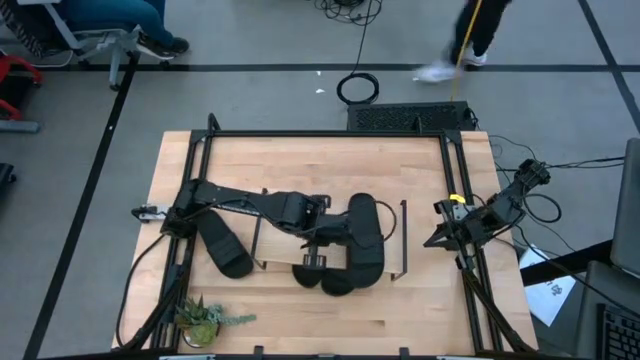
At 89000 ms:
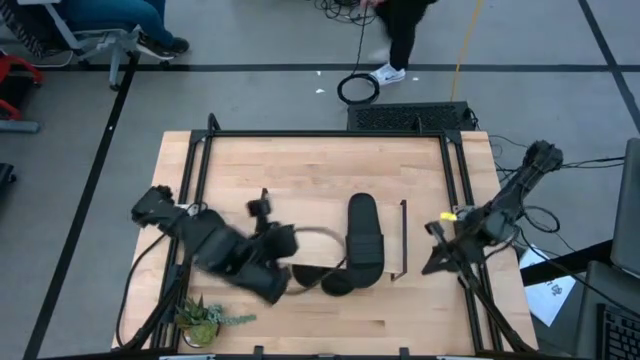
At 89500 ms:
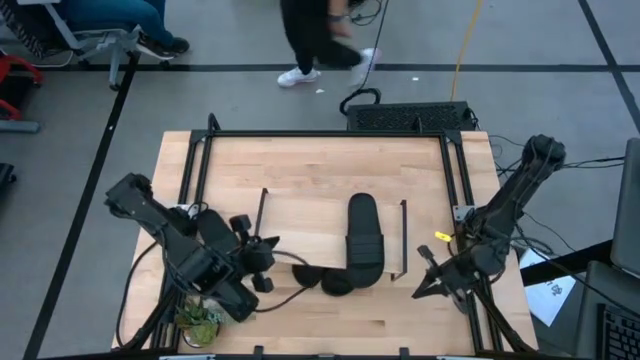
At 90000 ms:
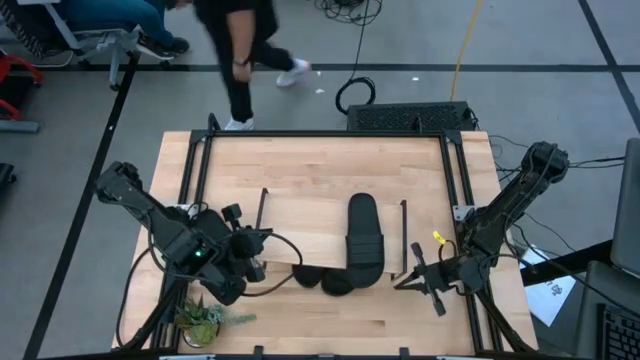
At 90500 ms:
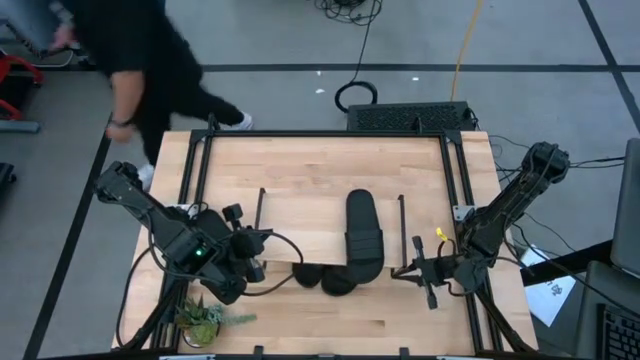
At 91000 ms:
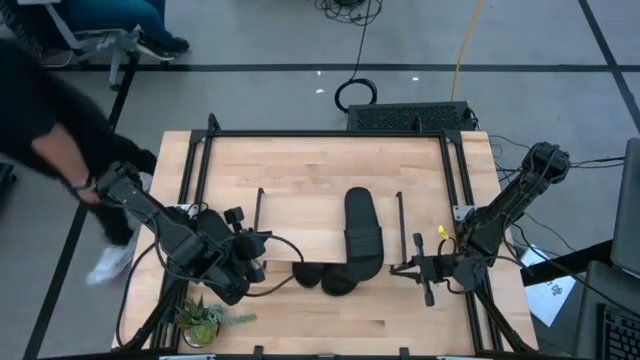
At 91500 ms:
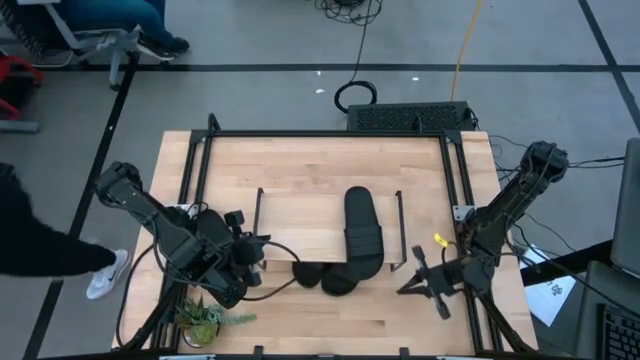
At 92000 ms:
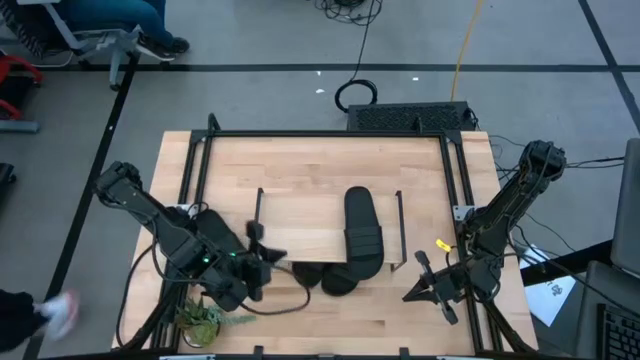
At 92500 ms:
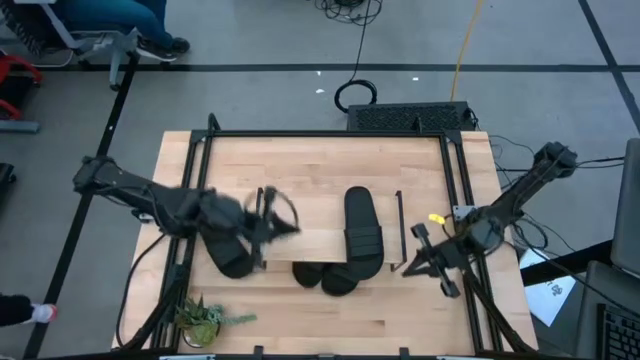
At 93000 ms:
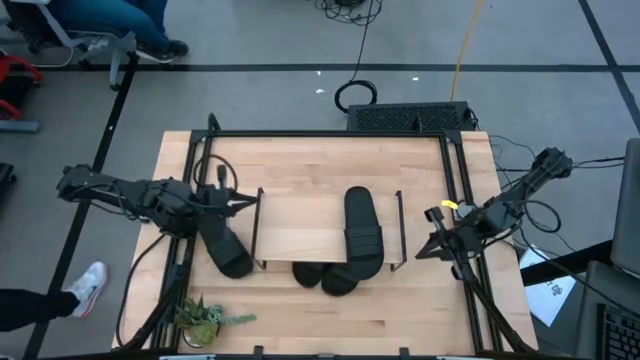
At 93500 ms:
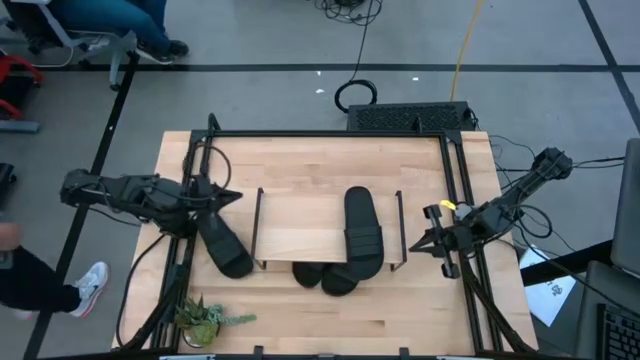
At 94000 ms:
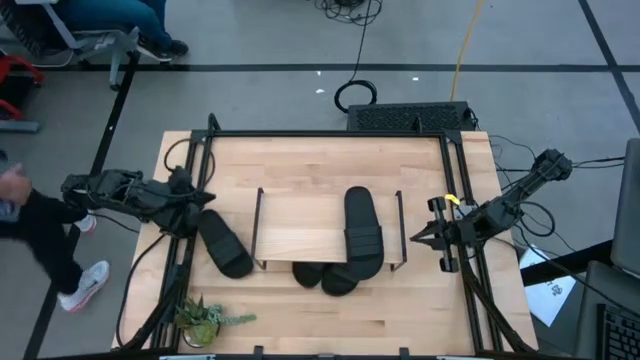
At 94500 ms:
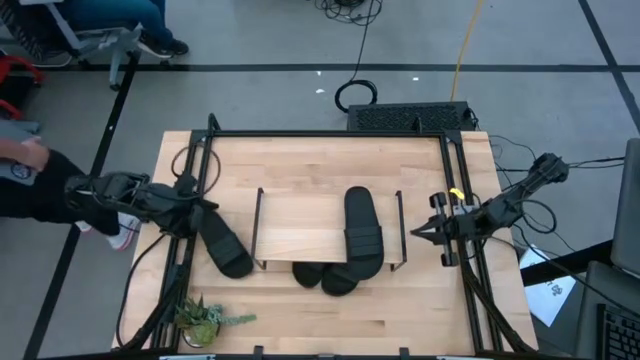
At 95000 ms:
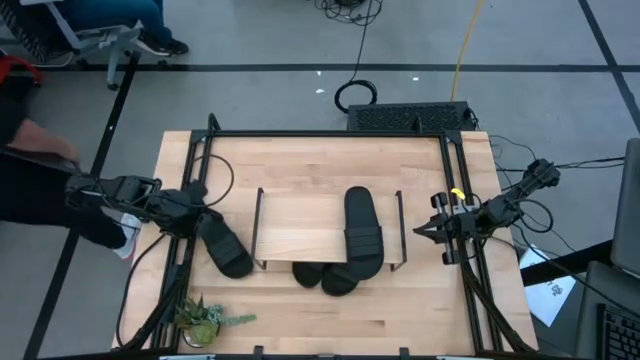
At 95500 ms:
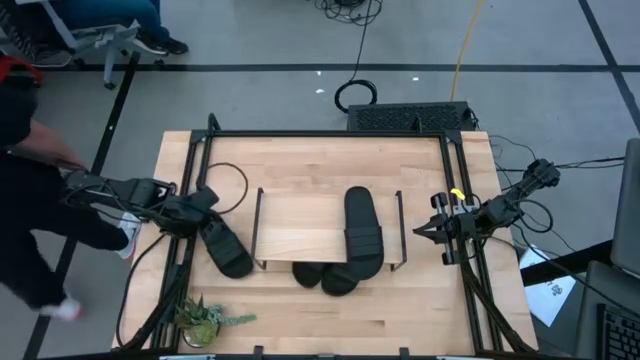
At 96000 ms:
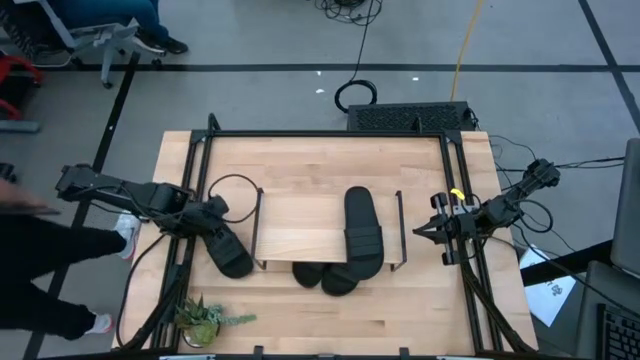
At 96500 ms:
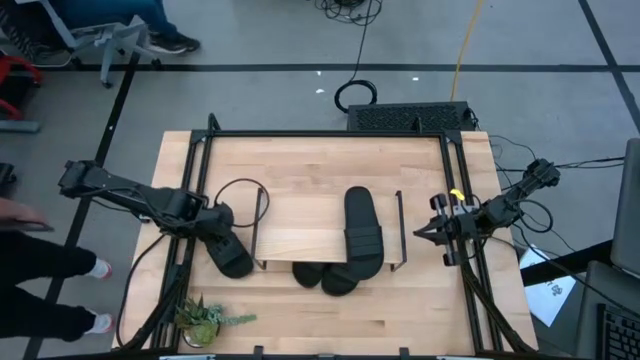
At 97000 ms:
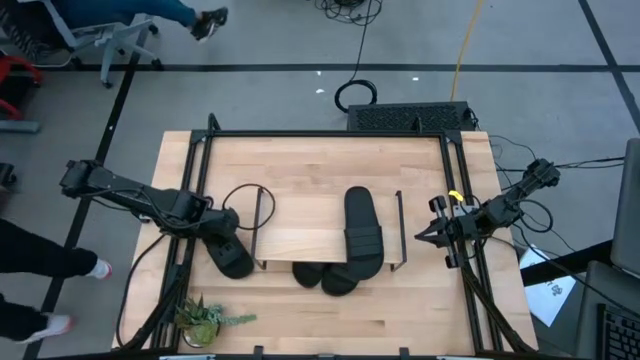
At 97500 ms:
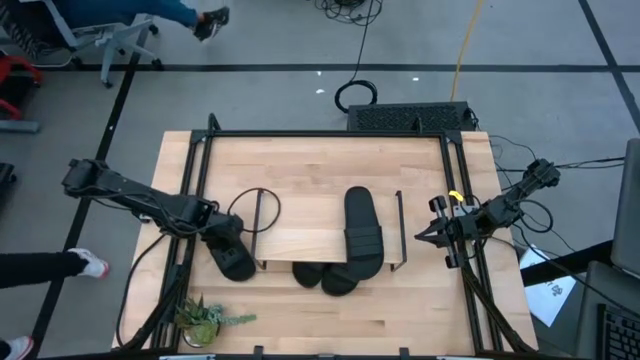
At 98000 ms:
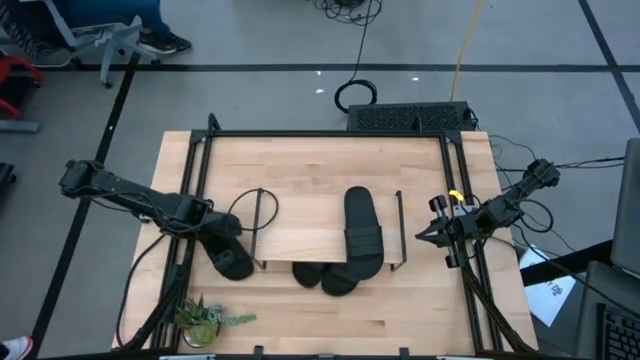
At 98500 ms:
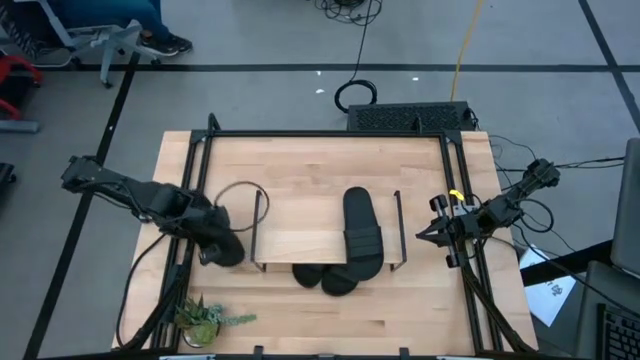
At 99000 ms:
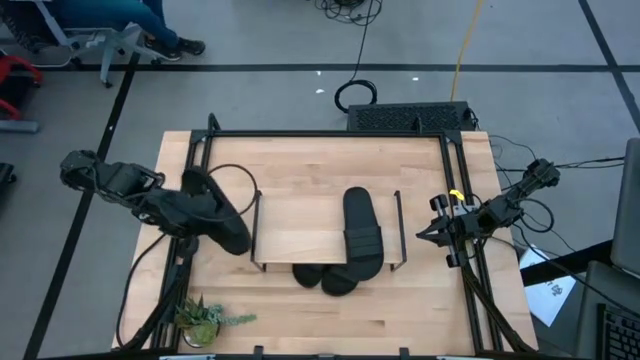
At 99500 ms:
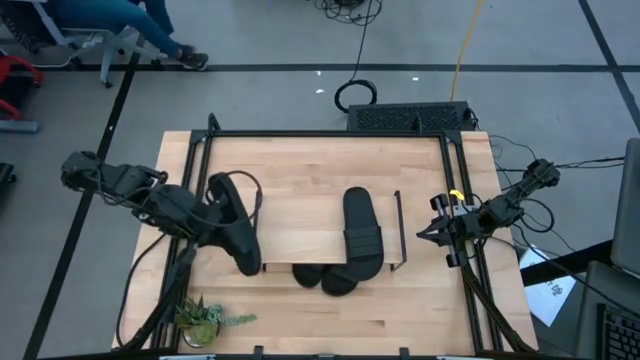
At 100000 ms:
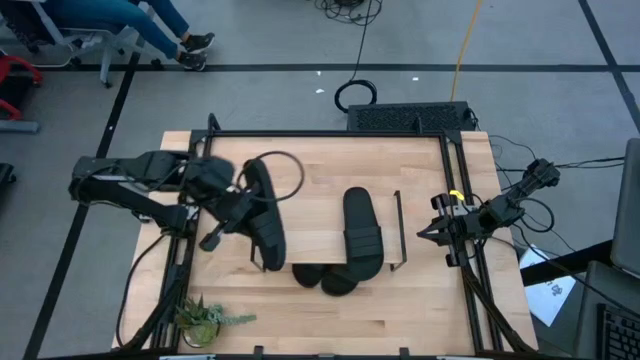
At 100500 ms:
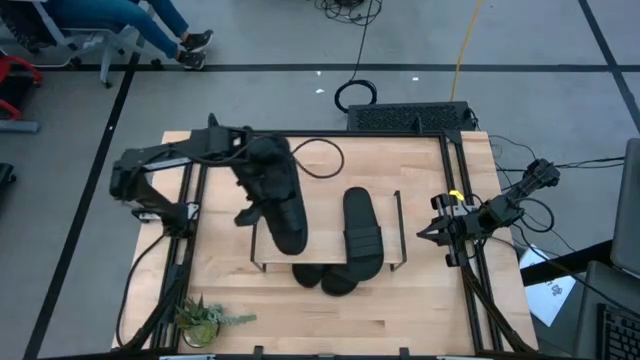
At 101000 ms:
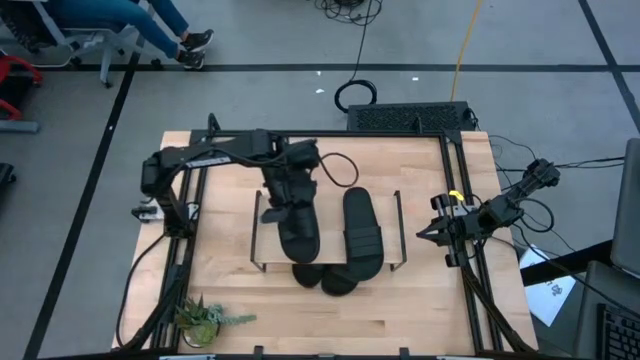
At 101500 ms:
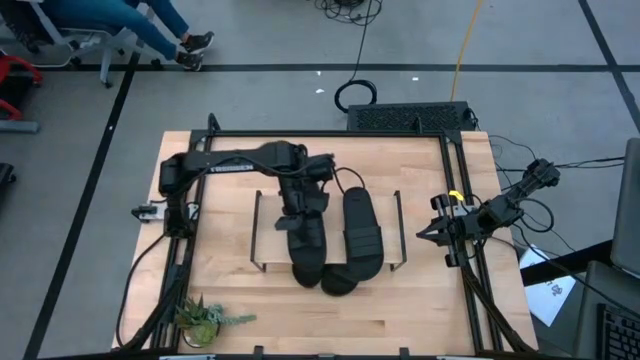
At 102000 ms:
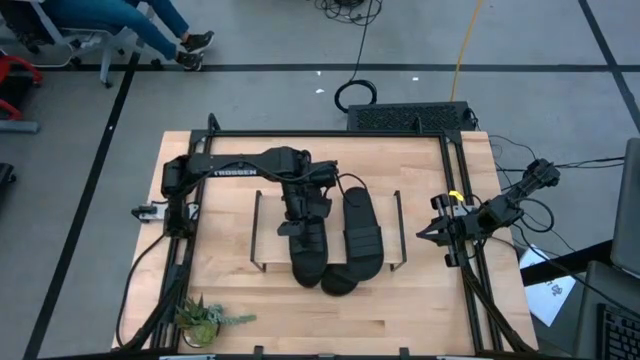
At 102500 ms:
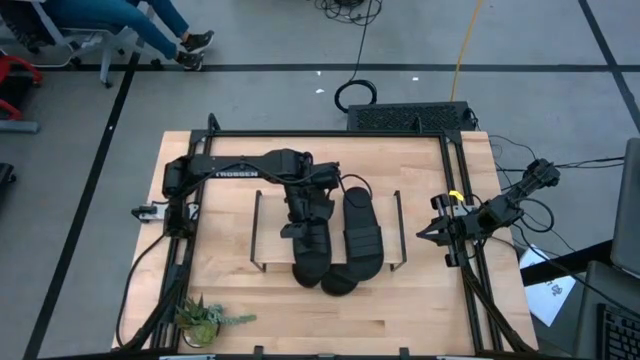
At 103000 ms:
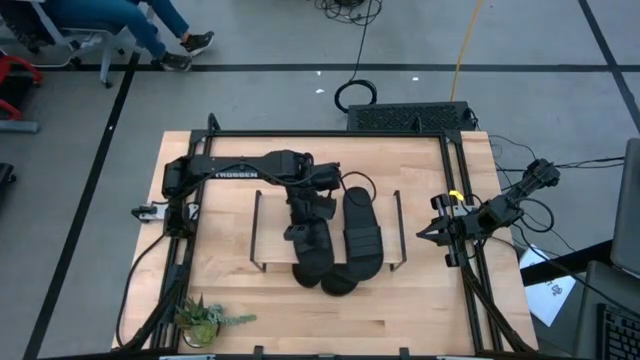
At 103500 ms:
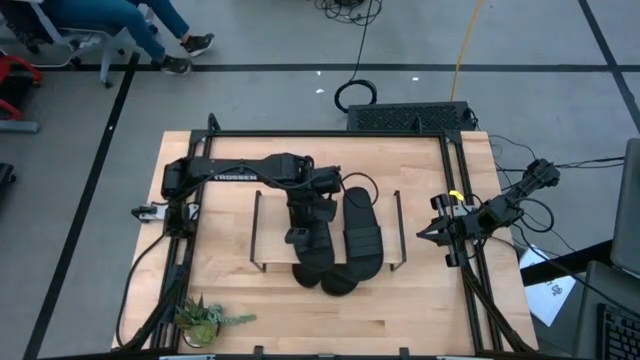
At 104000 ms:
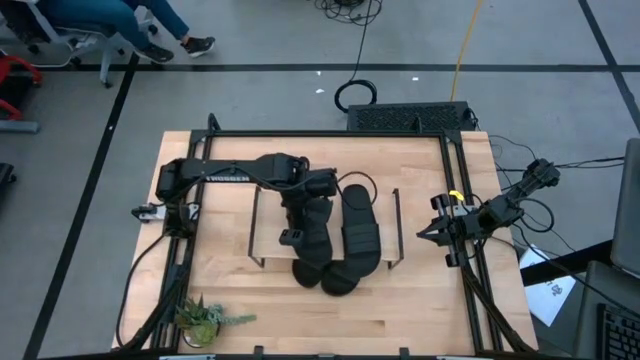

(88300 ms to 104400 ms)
Task: Pick and place slides into the shelf
Put the left black slipper aligned with the right black slipper on the shelf

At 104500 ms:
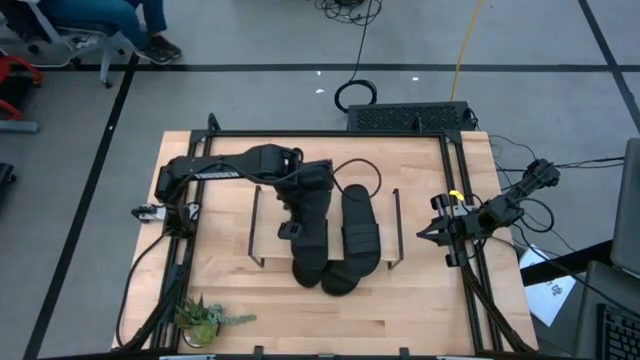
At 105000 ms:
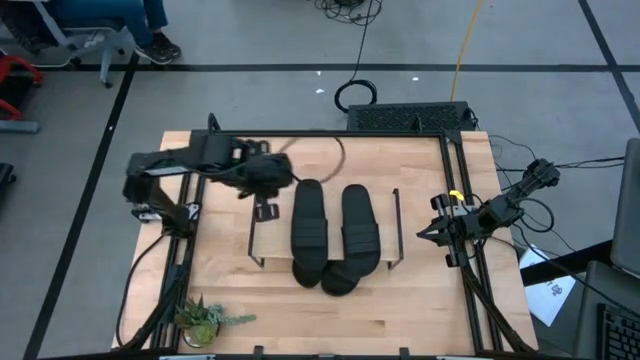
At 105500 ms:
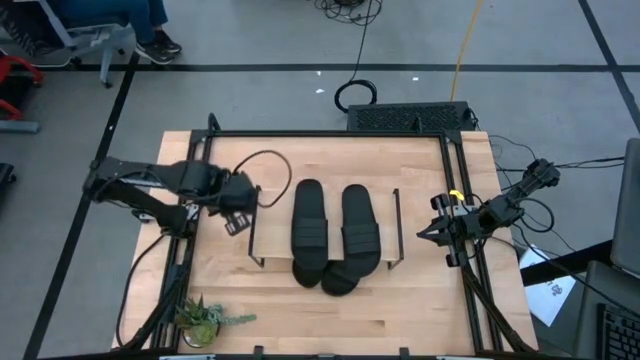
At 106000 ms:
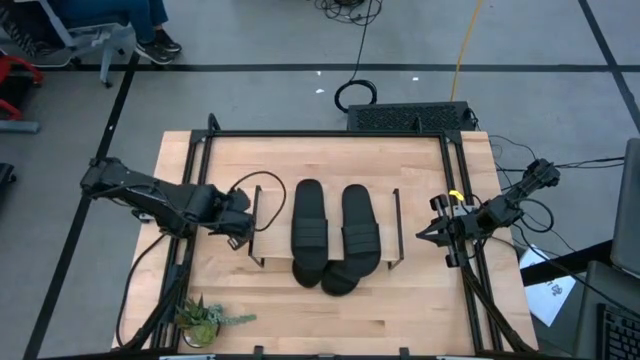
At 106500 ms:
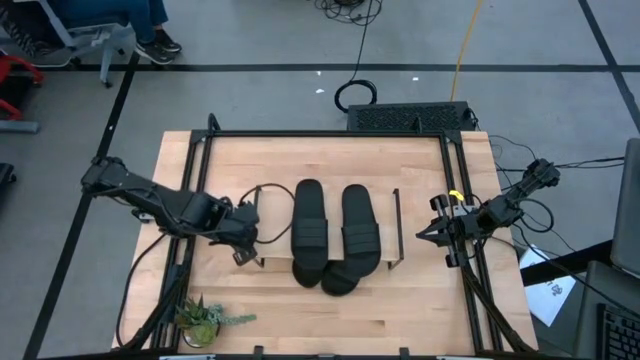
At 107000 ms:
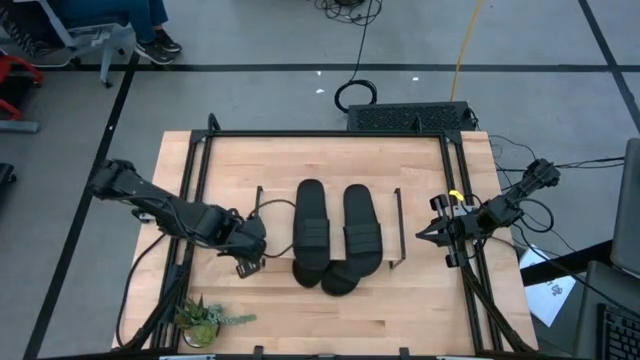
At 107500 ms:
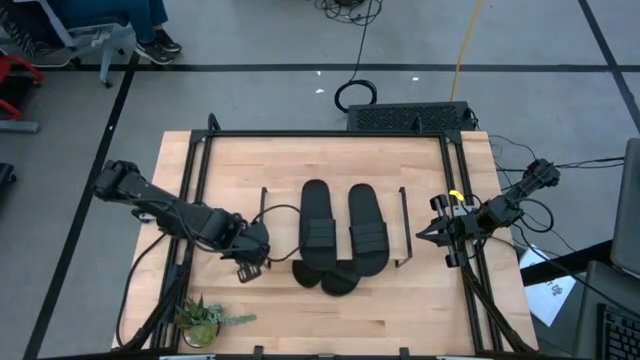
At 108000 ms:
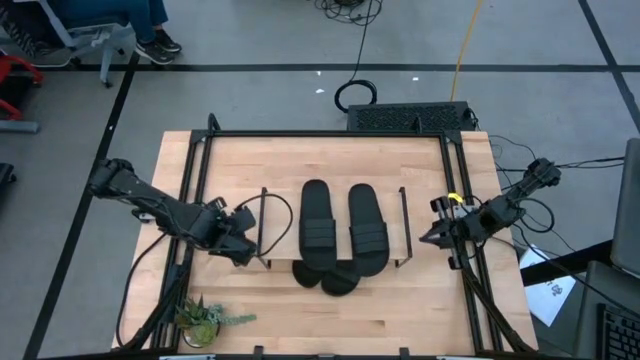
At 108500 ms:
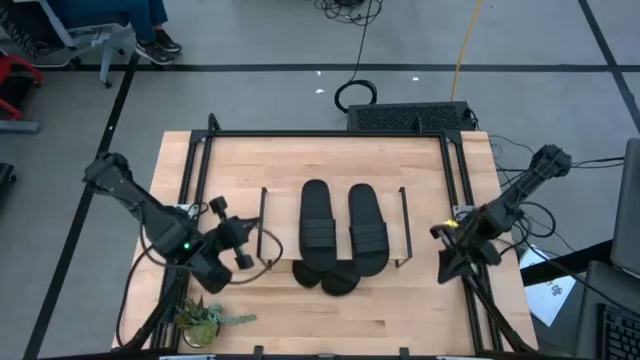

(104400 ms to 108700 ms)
Adjust the shelf

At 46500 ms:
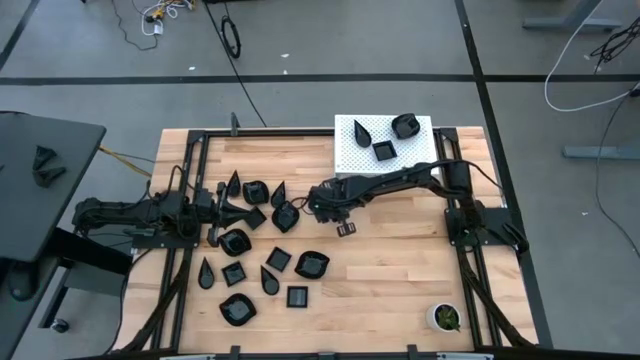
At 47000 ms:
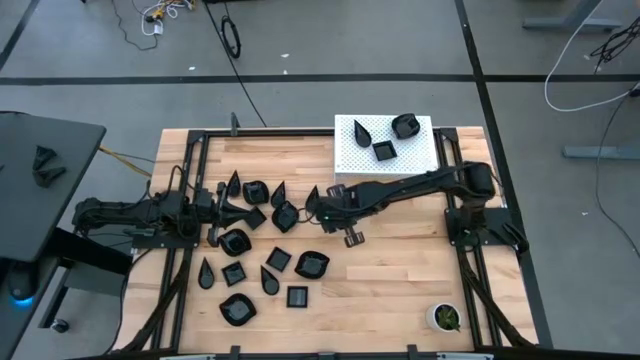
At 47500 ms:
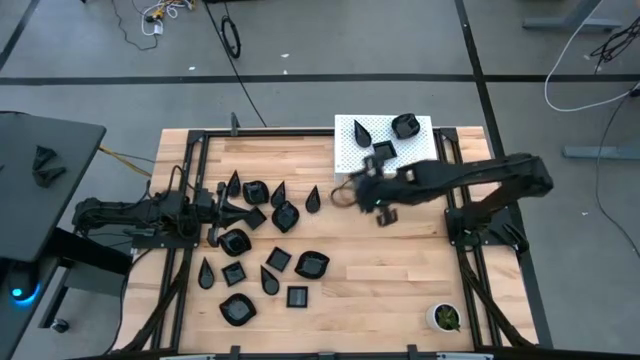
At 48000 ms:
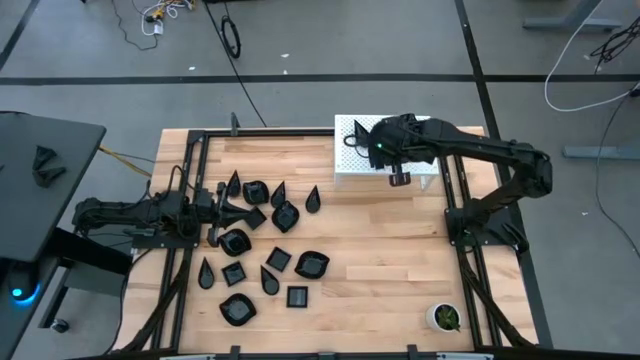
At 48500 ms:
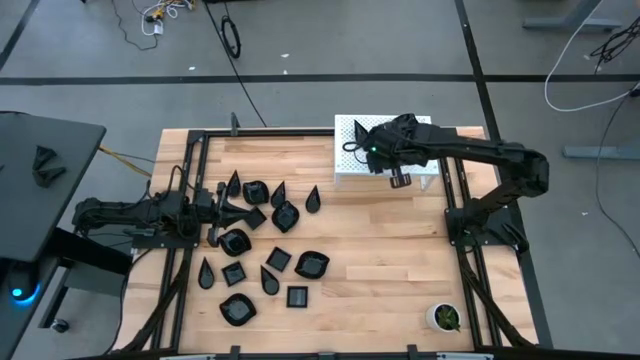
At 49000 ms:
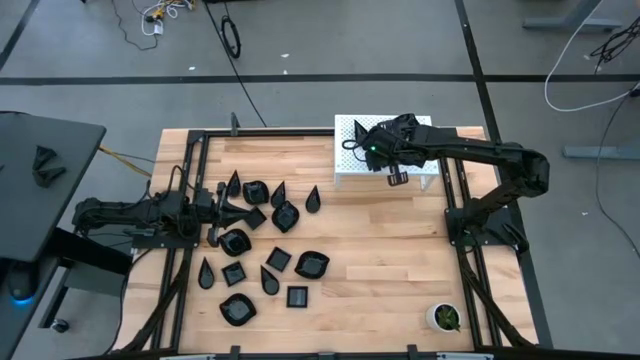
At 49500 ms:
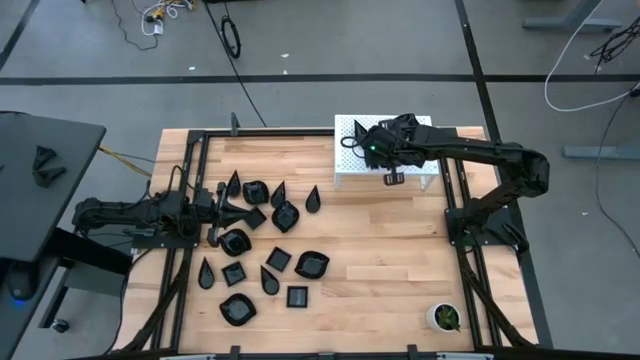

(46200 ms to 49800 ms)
Task: Pick & Place Mini shaped plates
Stack the black square plate on the black square plate on the shelf
